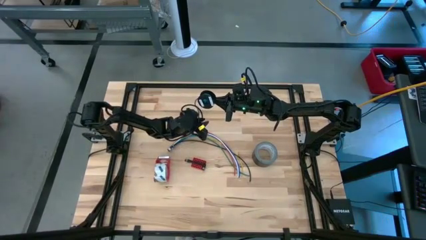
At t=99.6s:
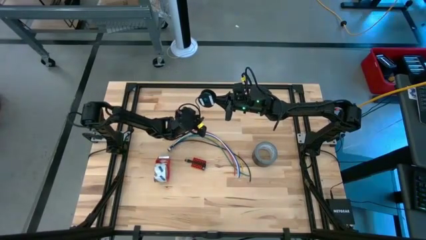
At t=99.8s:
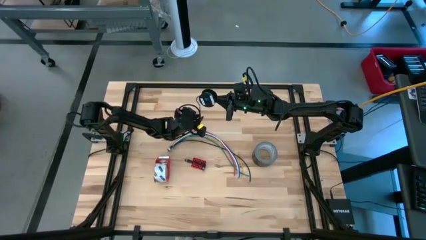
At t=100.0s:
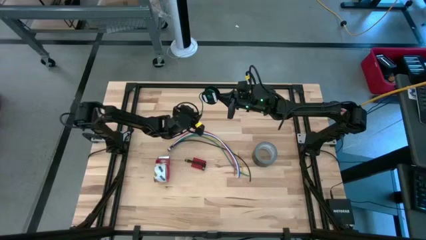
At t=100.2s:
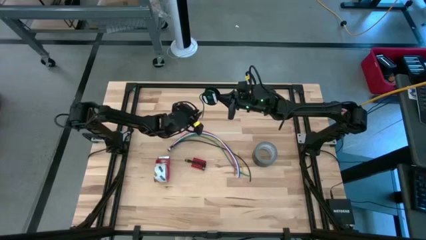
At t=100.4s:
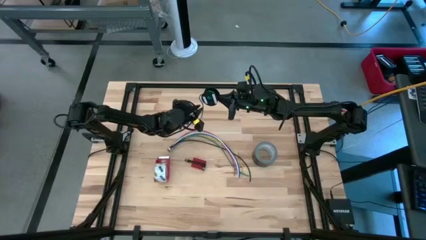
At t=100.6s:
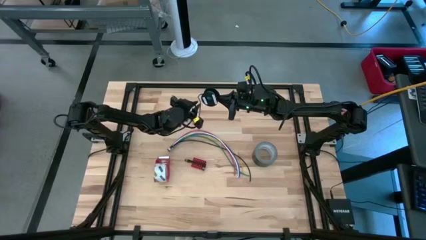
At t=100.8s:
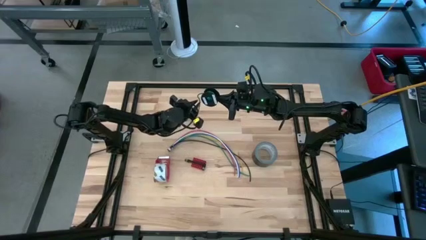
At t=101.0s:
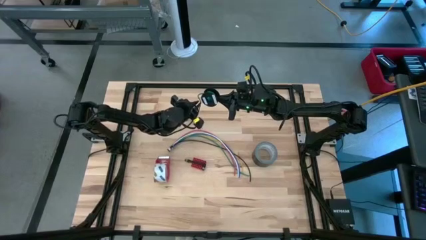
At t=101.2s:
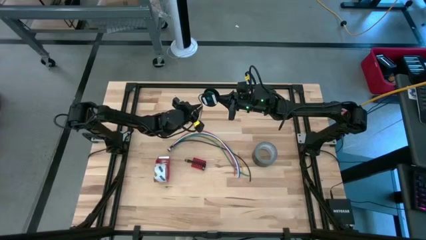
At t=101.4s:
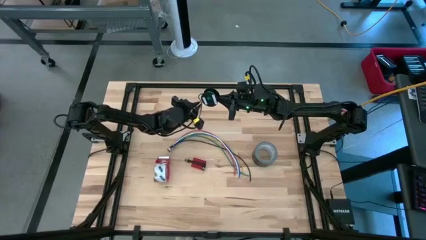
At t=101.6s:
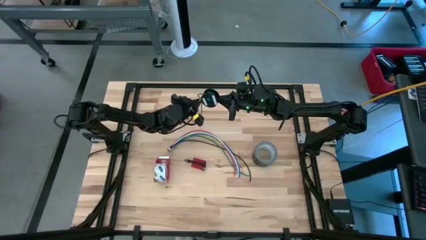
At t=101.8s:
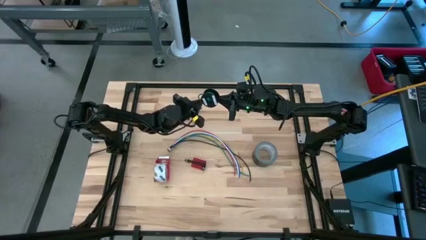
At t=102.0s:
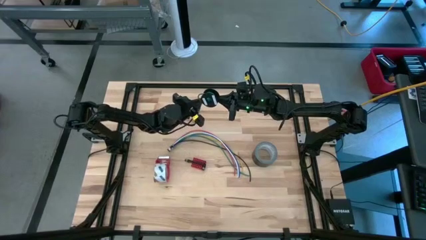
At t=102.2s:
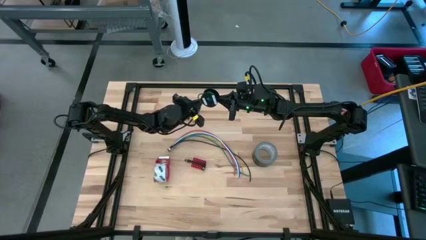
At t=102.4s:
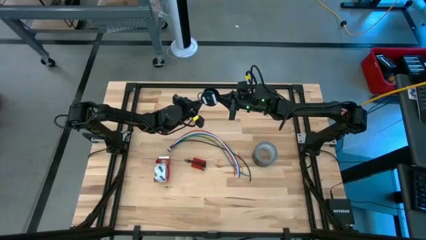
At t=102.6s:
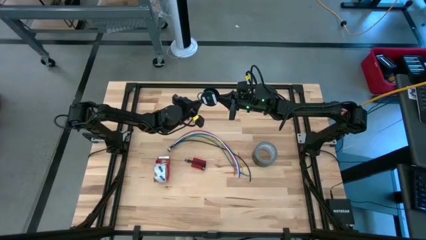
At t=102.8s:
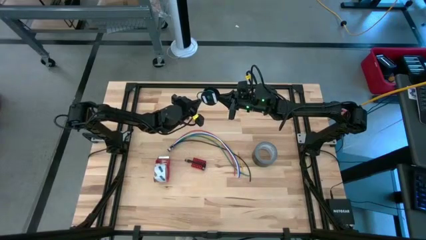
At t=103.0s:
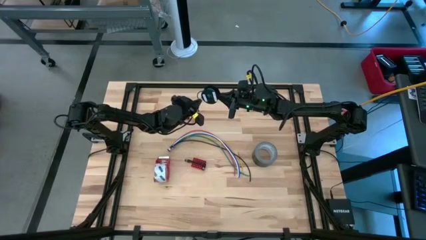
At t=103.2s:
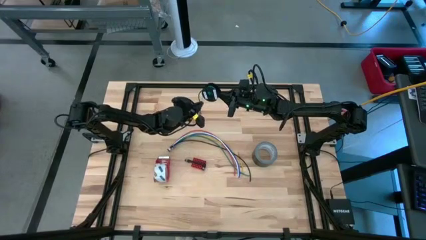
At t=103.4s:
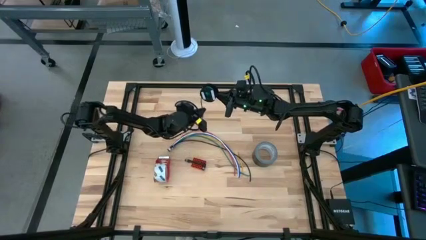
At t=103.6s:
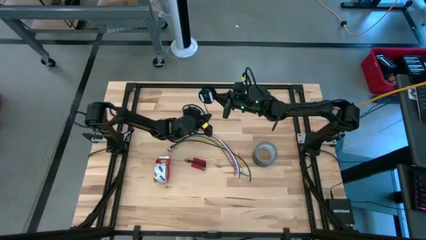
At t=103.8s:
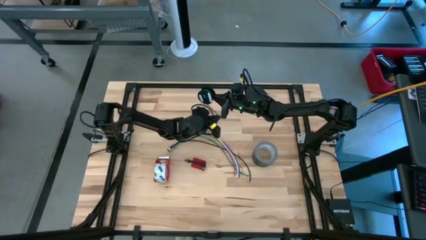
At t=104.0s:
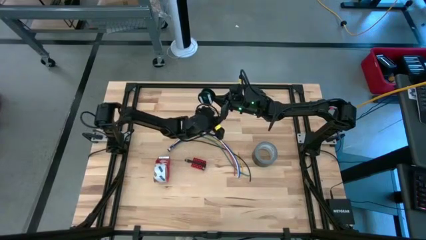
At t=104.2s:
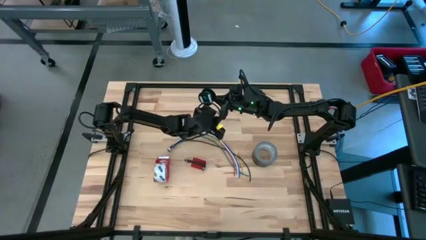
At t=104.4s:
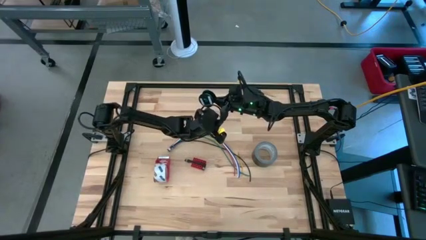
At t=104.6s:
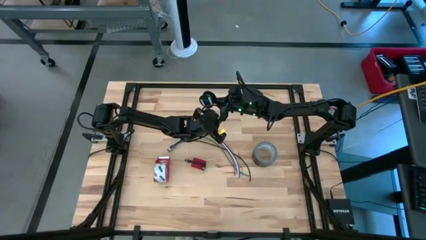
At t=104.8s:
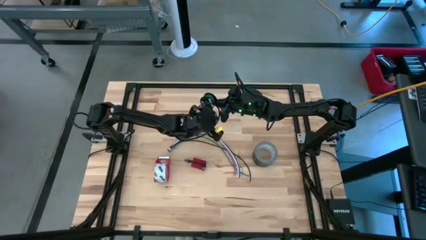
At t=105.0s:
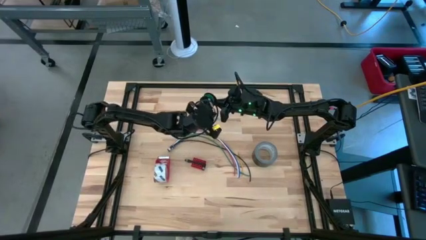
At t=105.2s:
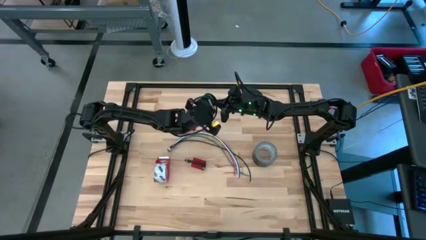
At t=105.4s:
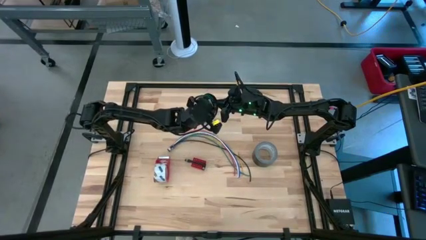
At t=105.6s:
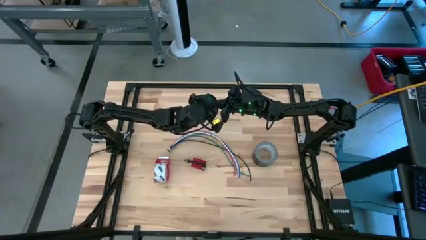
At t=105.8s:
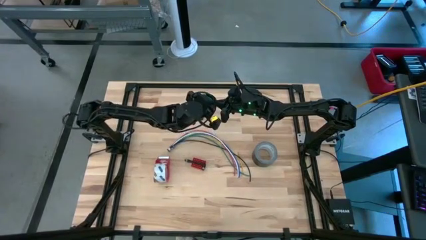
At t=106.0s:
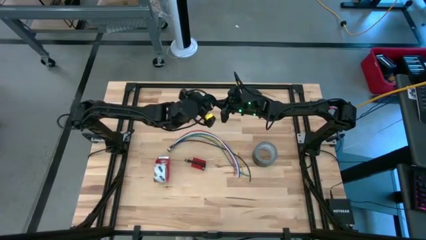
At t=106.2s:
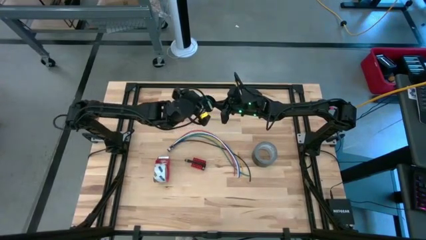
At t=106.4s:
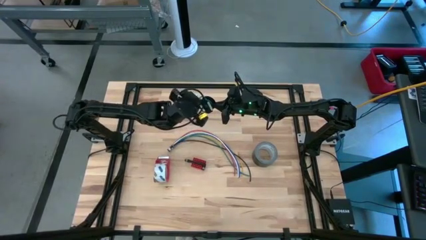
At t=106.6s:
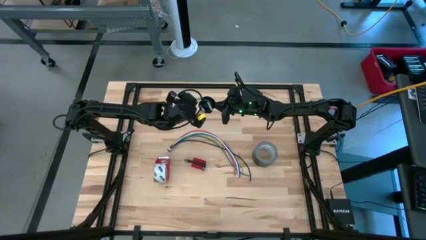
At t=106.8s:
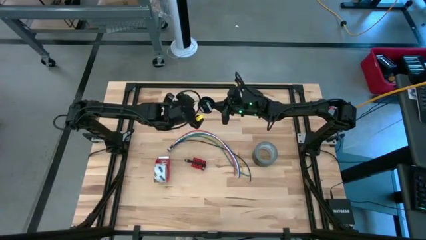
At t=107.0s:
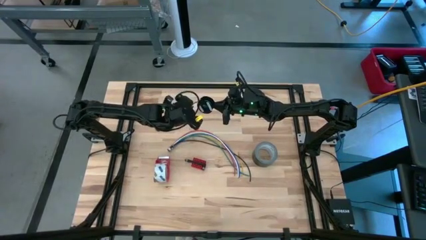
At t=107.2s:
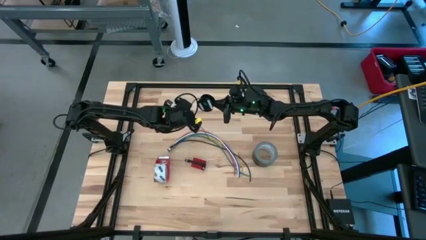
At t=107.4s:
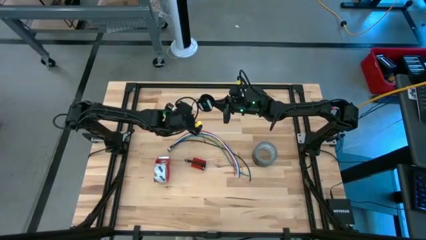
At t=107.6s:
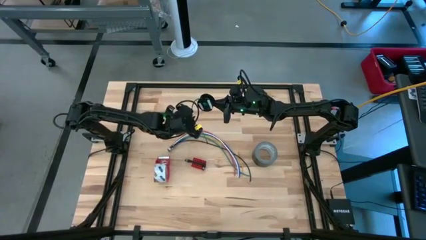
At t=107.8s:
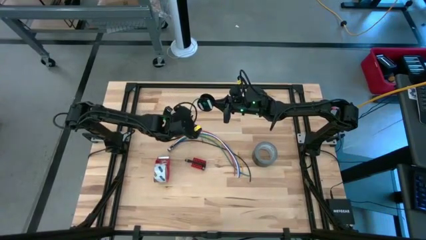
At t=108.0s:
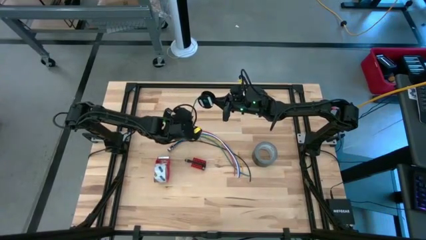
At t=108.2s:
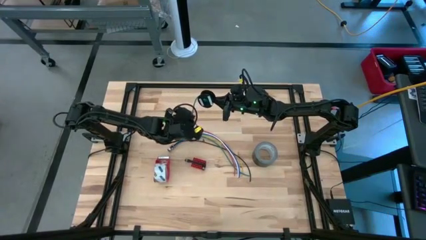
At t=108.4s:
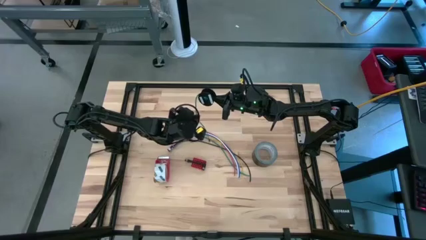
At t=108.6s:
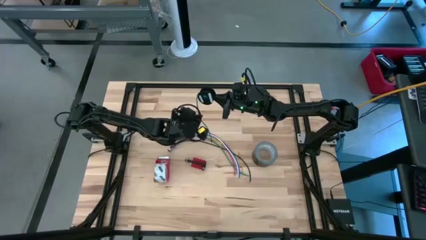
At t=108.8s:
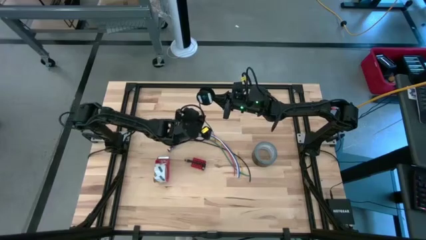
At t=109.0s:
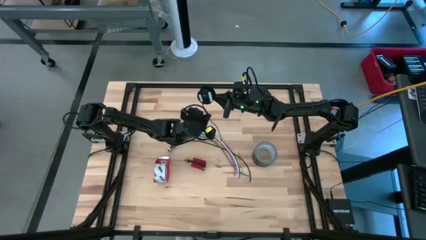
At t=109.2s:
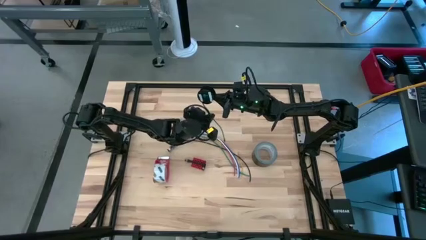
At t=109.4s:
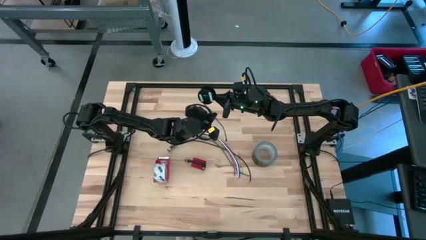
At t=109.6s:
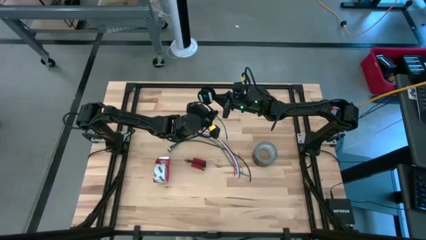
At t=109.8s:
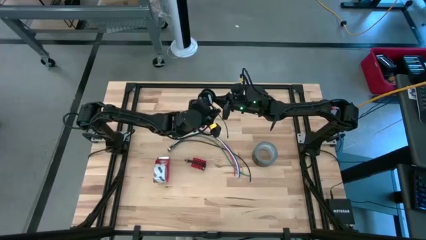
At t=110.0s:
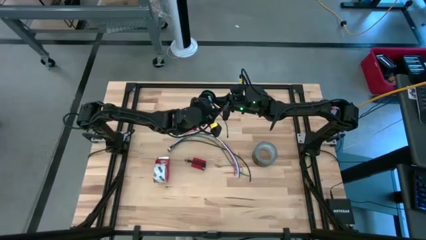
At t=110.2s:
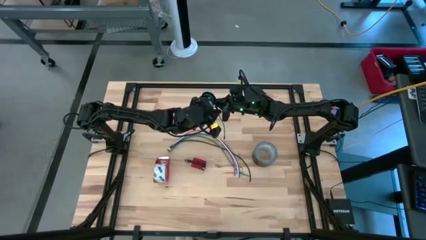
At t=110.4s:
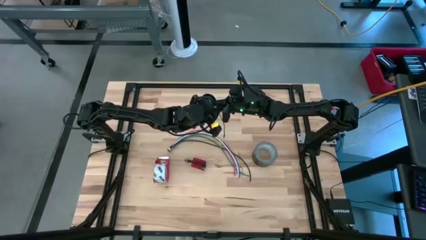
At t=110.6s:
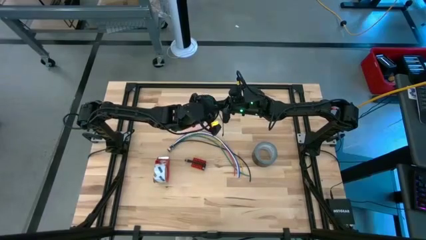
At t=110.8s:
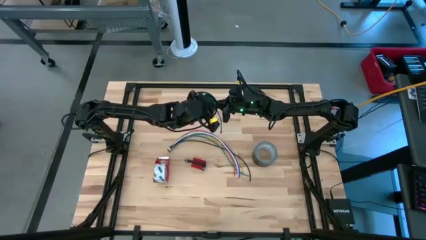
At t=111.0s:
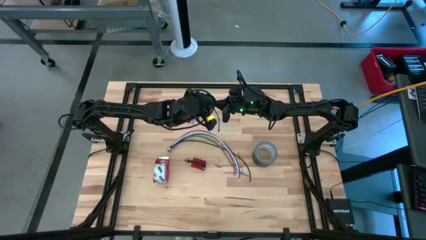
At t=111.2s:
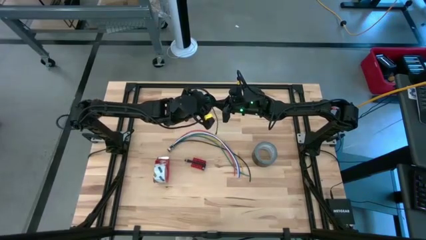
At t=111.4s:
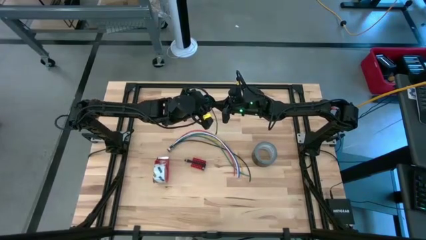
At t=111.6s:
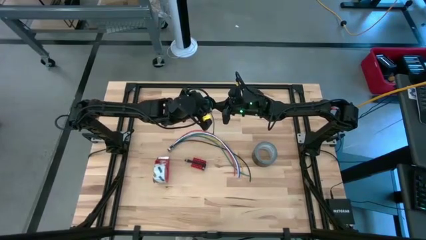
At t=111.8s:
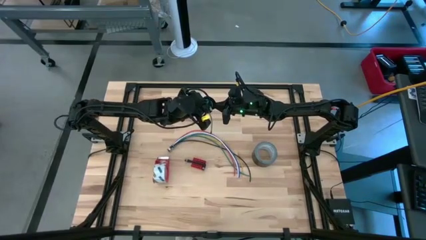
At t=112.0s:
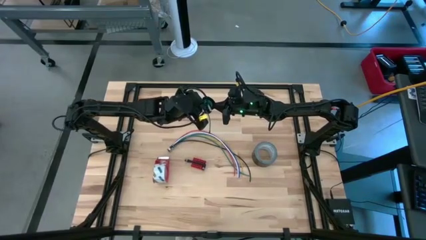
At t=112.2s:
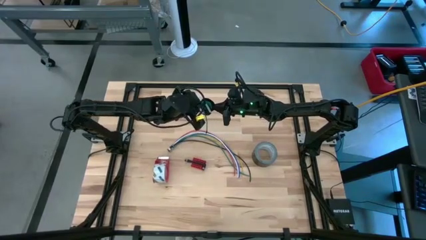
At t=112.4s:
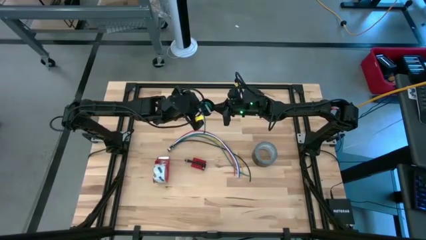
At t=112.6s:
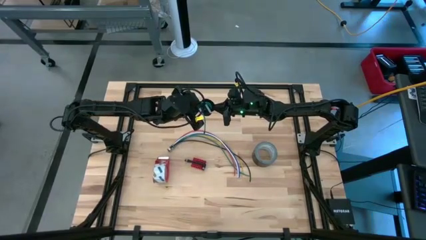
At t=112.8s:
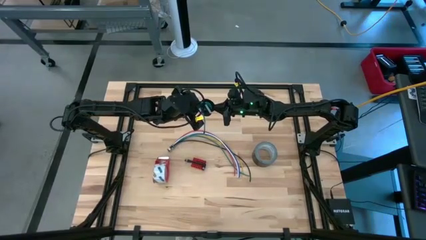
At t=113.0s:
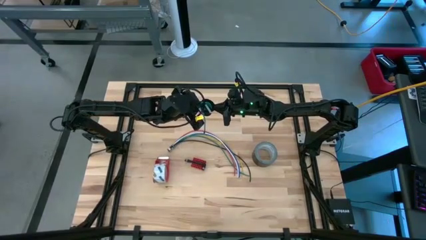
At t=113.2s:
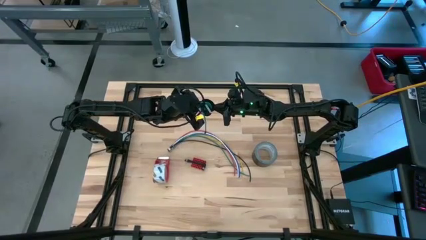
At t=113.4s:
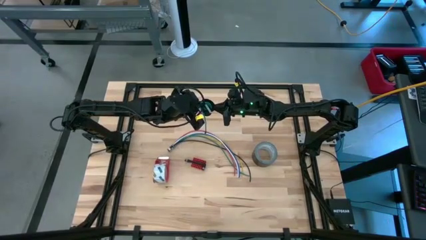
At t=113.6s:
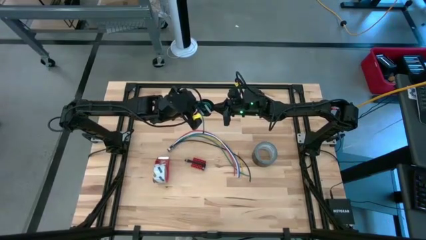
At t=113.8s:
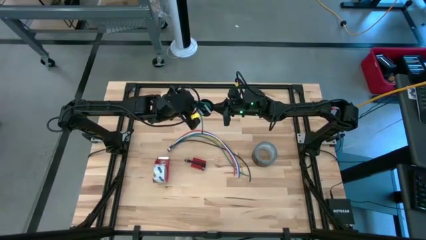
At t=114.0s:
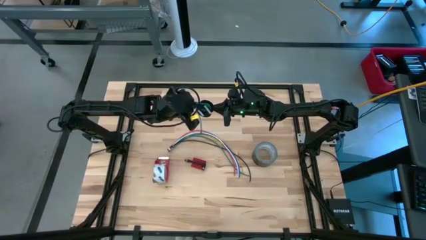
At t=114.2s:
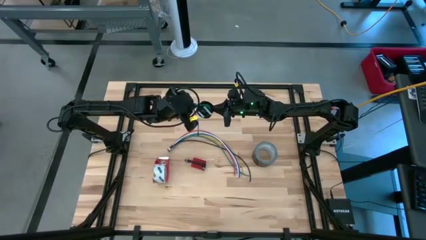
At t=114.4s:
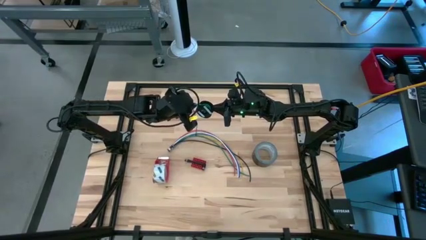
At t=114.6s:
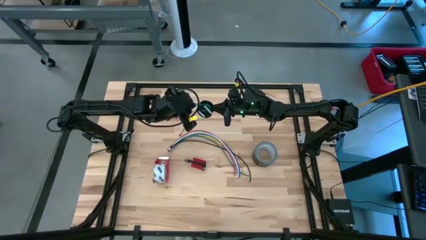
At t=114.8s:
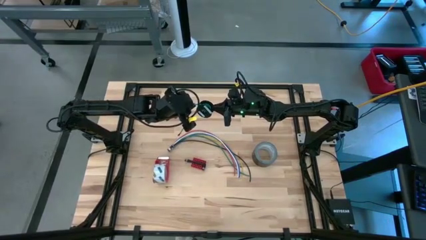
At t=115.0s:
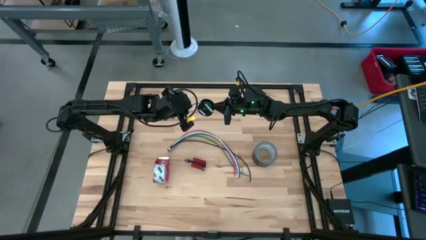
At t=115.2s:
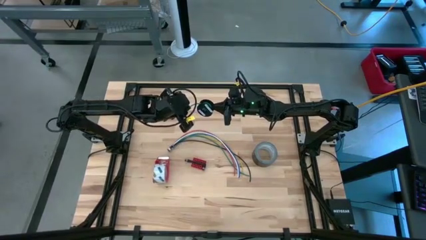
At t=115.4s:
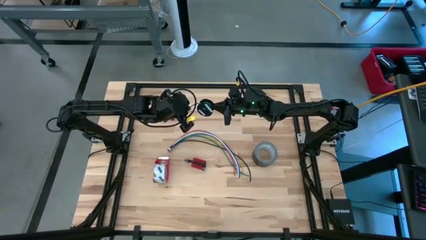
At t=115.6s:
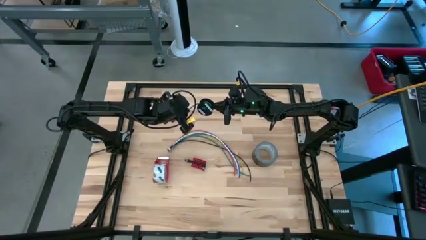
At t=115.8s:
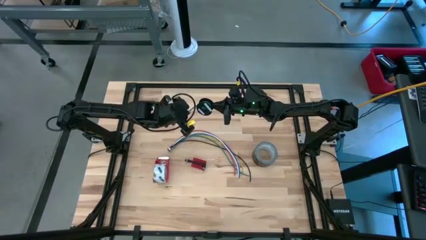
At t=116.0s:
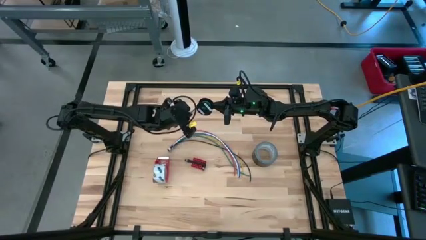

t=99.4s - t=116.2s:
Task: Coil cords
Coil the green wire onto the black spool
